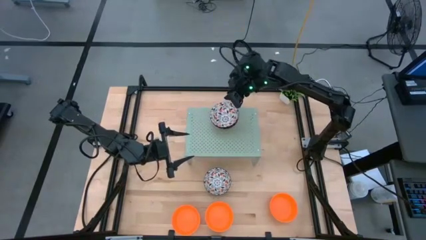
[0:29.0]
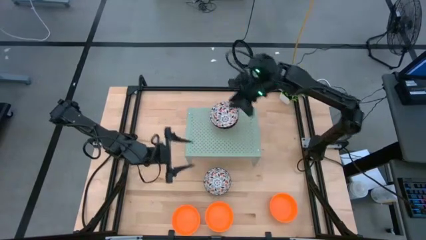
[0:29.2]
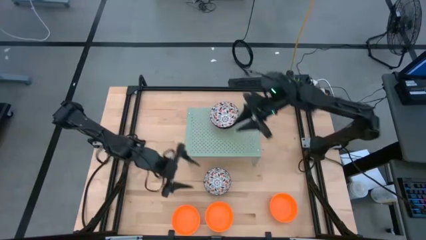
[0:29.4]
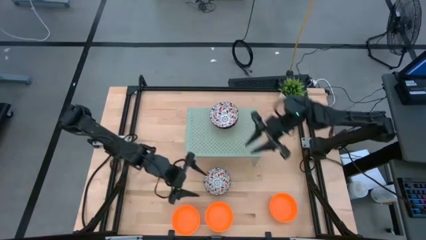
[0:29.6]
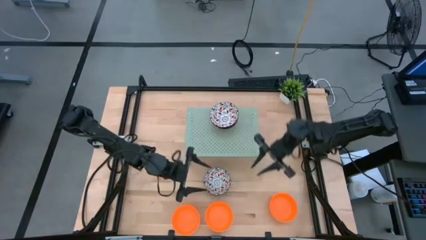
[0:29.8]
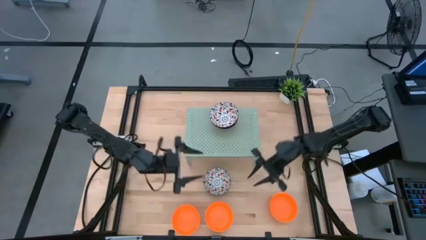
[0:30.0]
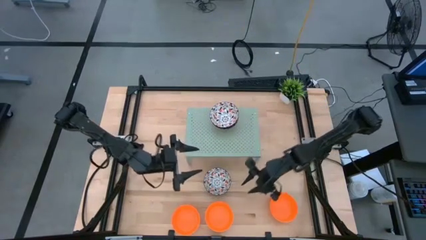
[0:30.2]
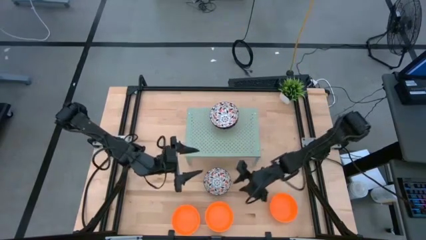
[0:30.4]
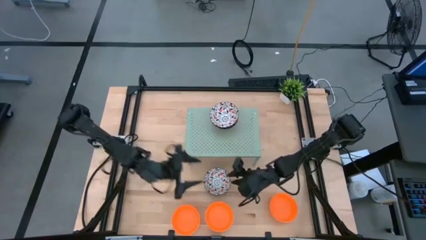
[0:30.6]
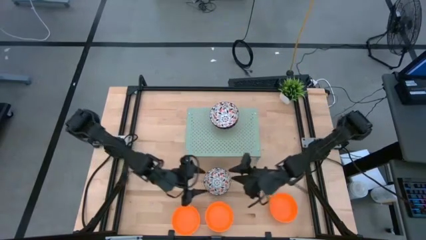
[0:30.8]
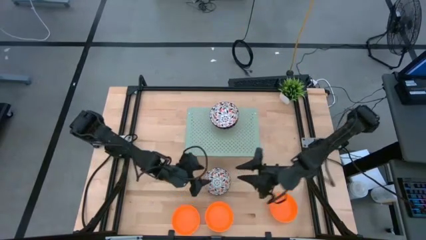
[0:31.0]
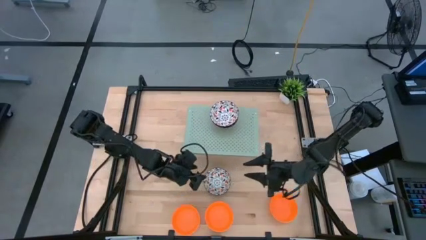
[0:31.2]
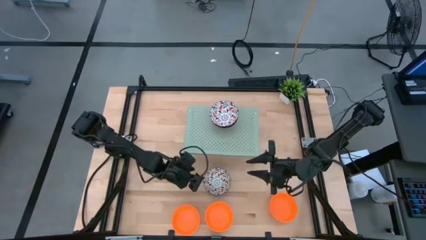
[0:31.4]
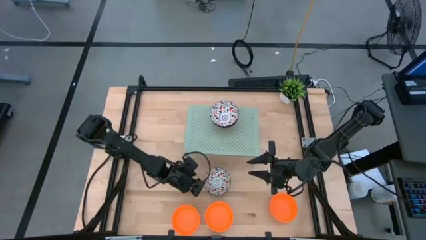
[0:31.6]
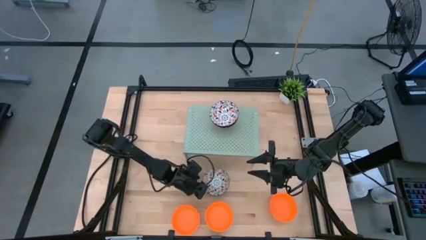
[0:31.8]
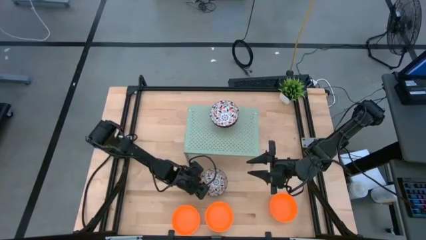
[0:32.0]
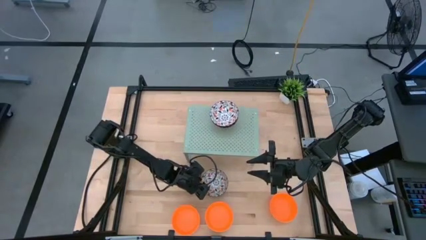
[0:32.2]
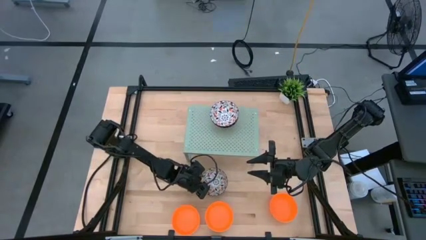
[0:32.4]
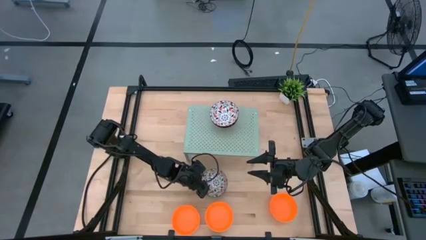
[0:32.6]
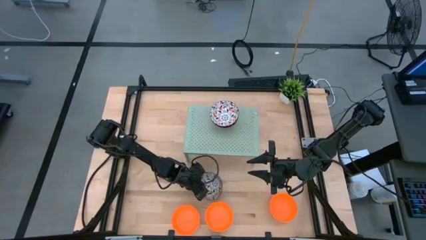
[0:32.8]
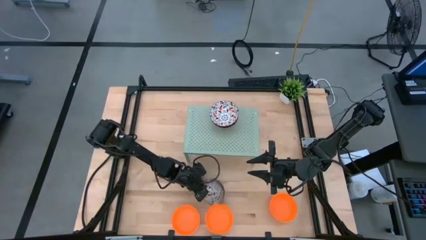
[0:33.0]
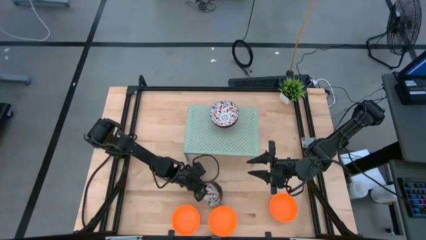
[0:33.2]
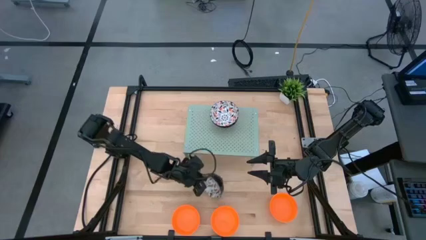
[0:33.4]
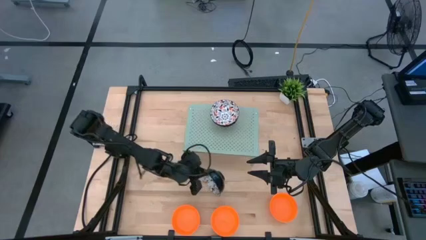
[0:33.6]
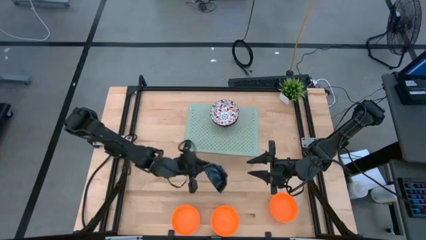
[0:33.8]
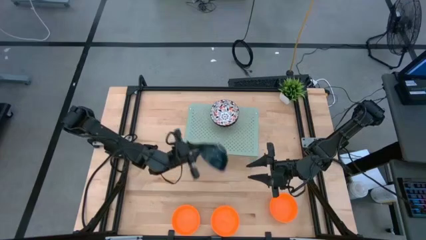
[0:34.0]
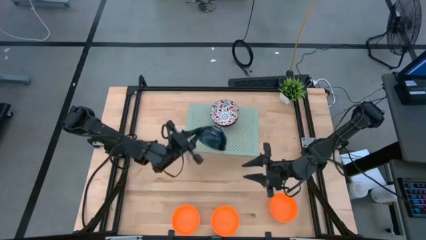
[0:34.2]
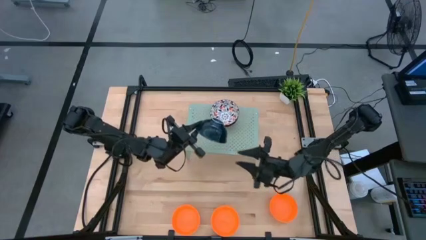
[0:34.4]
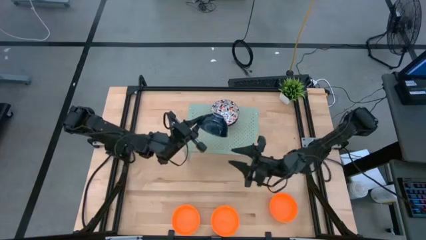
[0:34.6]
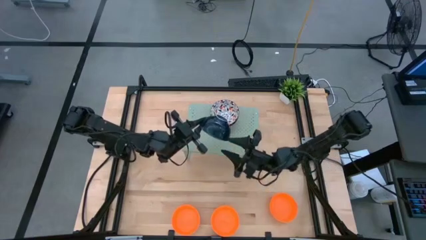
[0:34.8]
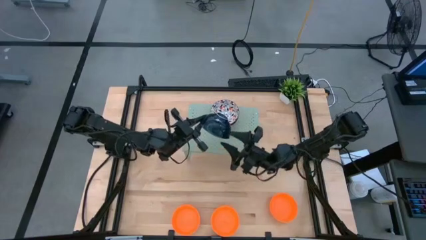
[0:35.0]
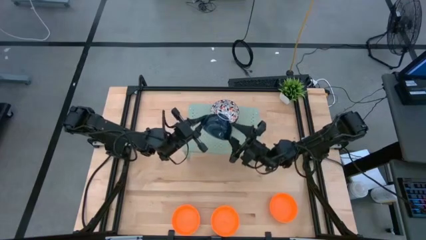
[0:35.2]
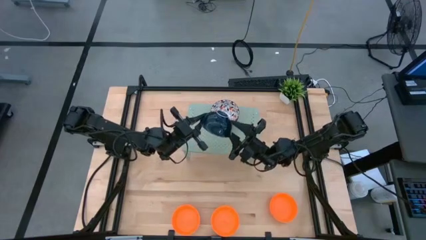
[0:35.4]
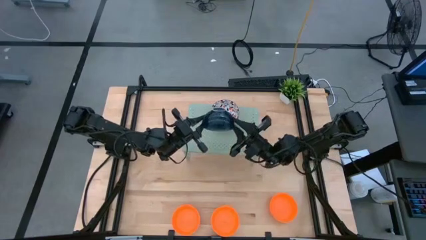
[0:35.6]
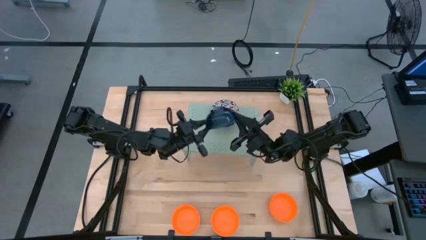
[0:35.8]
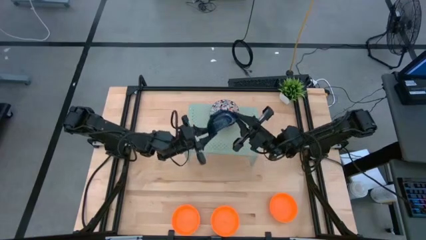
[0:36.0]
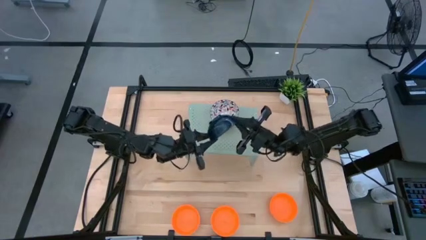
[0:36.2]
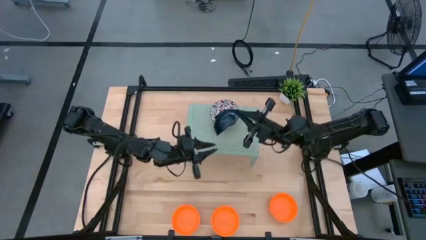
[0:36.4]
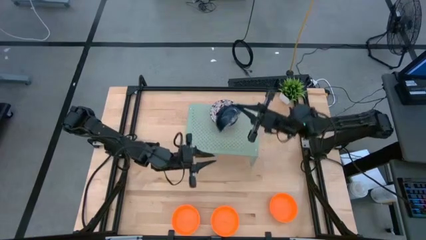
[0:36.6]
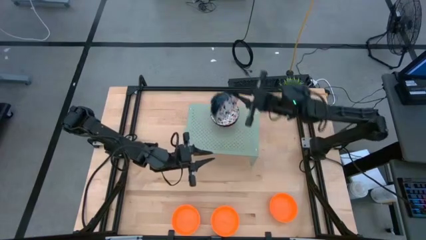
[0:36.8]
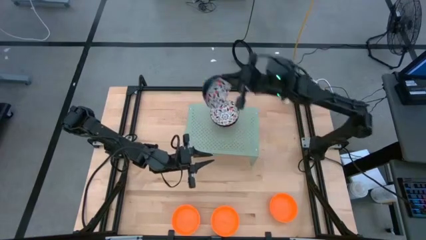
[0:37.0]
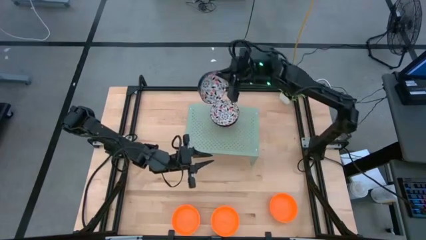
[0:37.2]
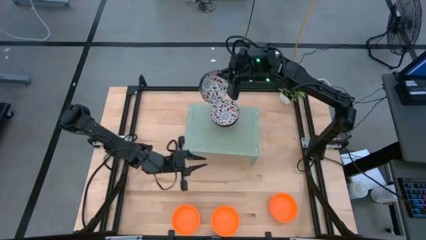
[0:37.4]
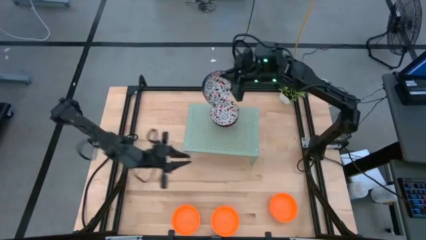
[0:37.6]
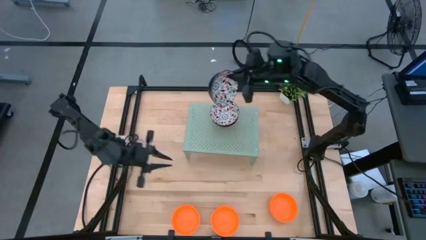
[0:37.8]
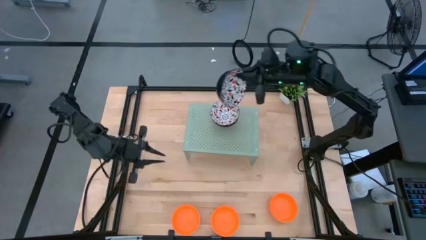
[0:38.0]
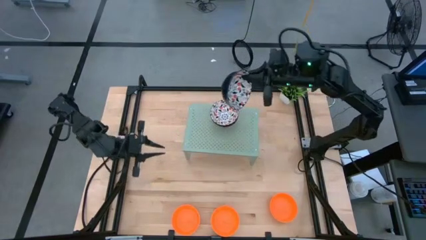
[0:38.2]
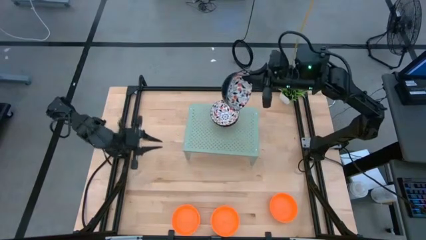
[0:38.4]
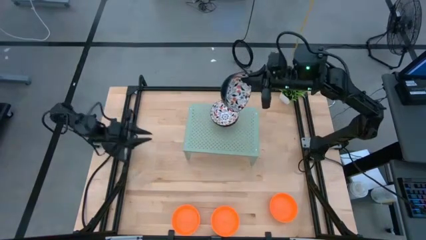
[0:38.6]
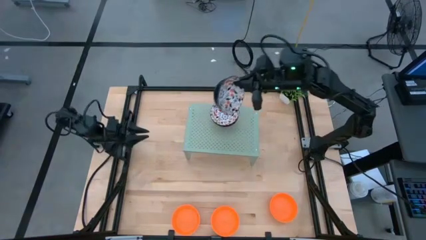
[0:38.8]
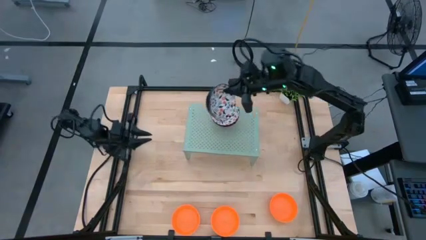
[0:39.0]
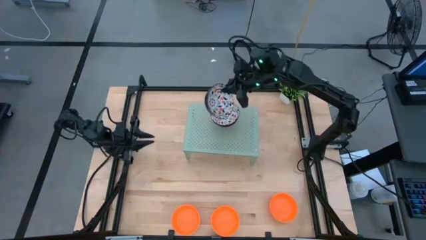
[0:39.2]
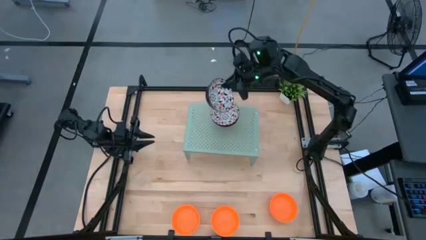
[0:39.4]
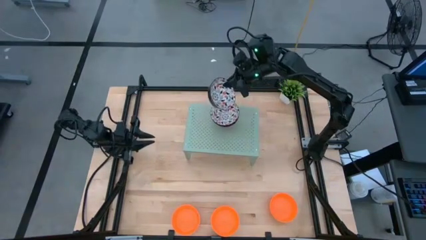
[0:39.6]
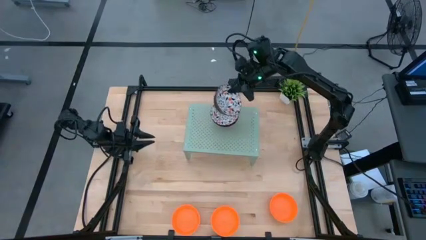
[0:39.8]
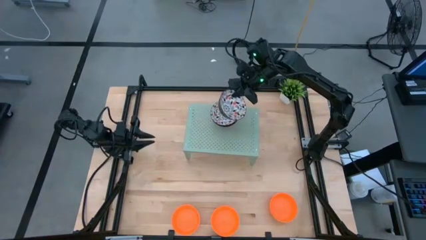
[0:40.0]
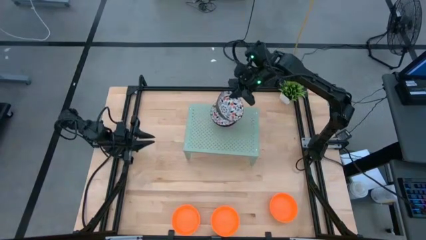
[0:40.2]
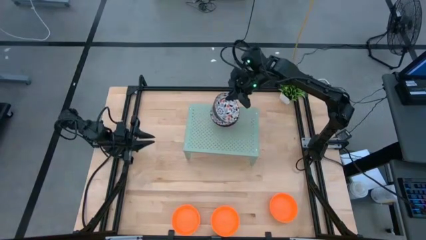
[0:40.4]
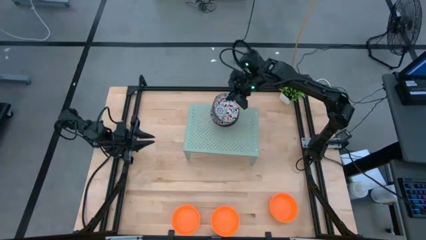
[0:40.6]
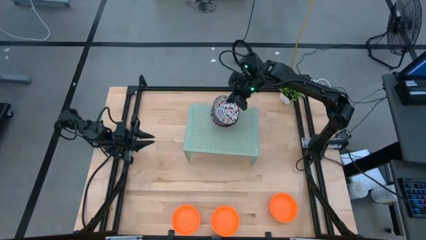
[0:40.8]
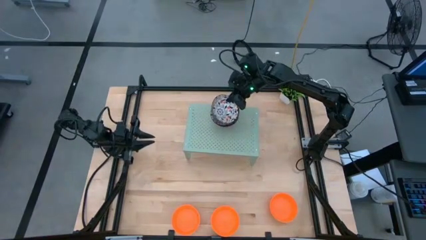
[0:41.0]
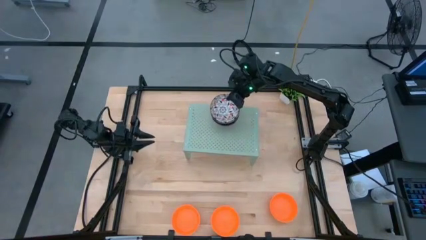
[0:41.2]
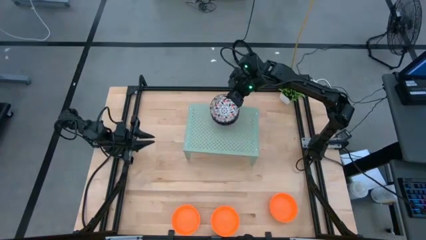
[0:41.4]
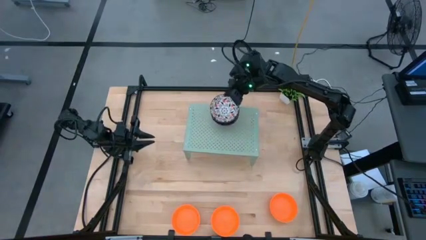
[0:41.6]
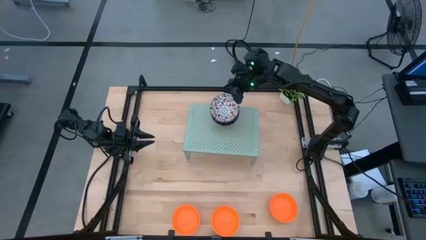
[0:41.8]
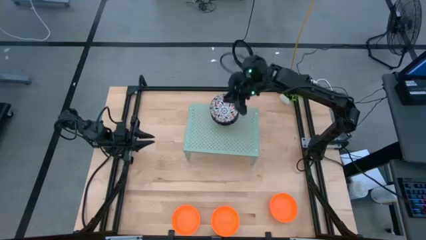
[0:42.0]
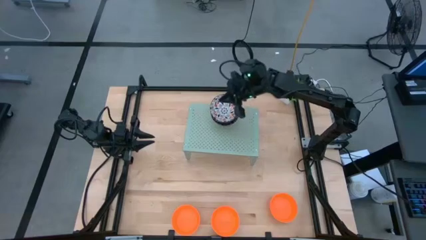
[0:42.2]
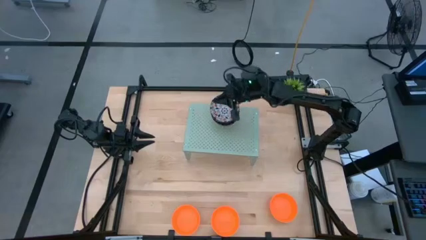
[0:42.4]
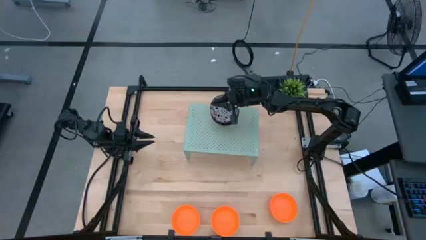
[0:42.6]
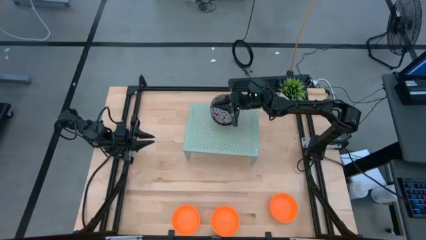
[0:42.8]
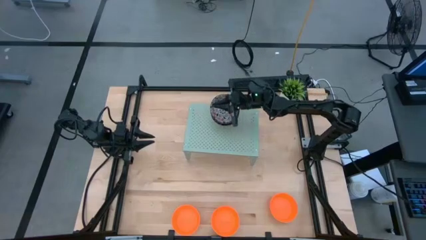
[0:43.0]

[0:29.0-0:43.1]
Task: Pick & Place Mini bowls
Stack the white patterned bowl on top of the white patterned bowls on the shelf
